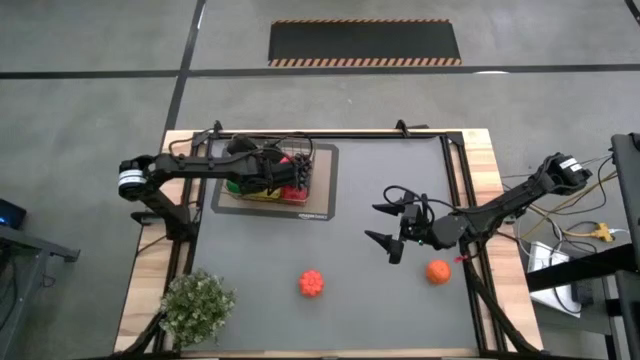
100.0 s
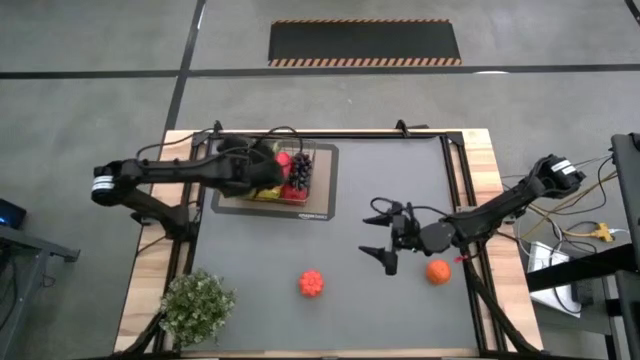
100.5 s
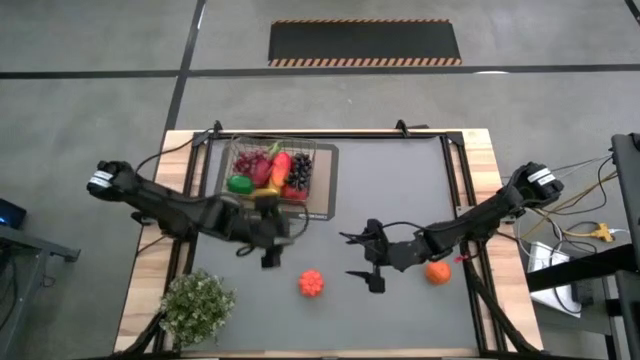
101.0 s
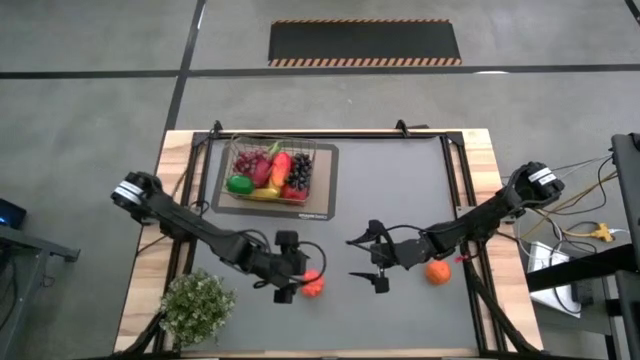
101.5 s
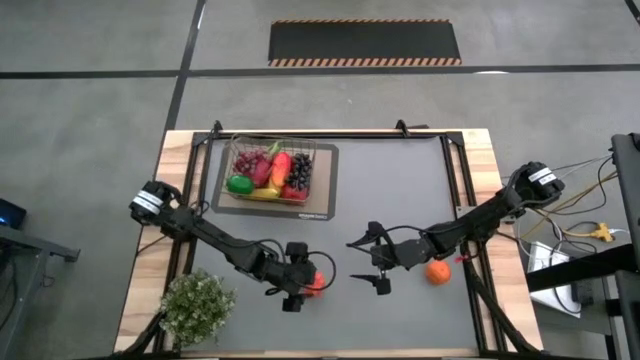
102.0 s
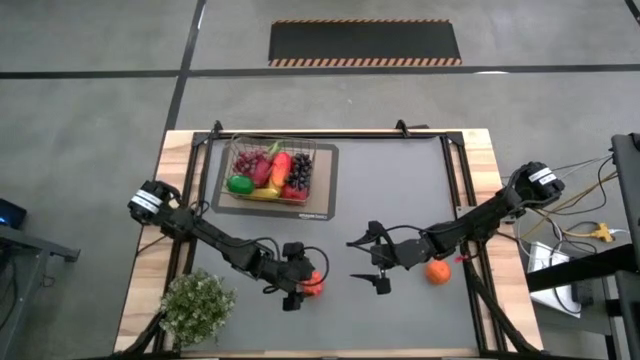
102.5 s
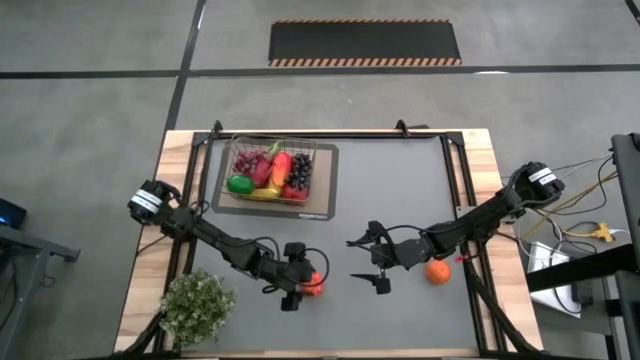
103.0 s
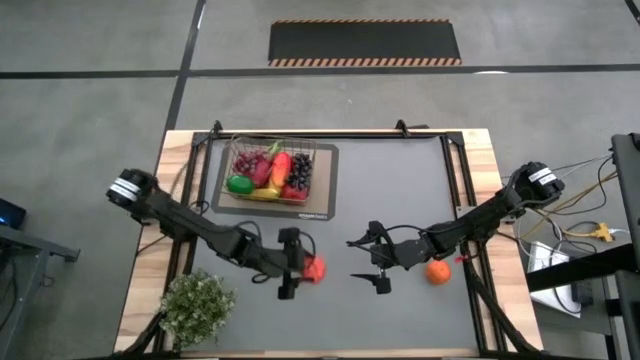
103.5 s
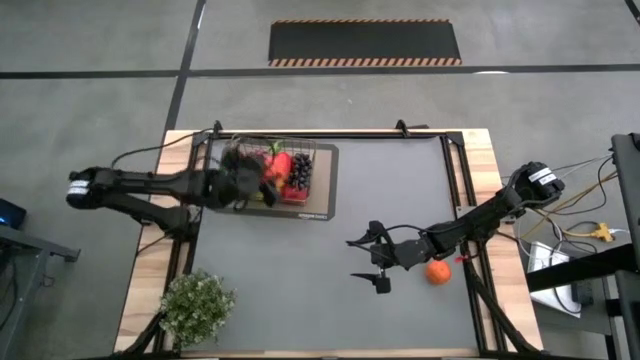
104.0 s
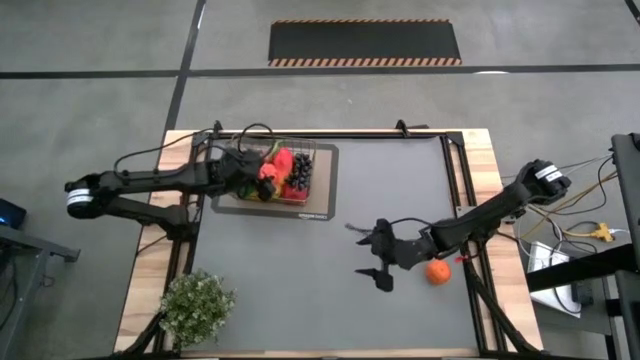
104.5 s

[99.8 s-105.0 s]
Task: Build produce basket
Put the orange pumpkin into the wire basket

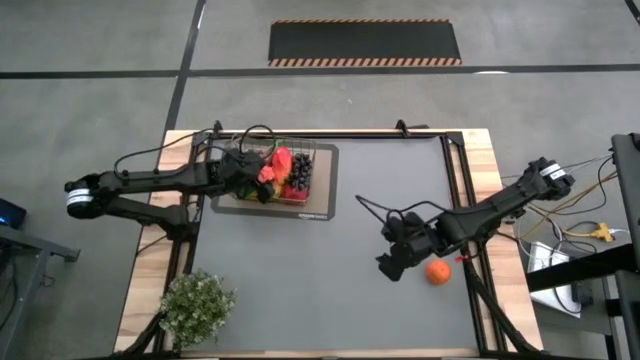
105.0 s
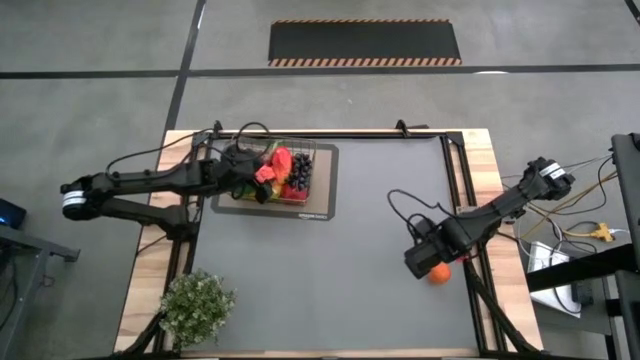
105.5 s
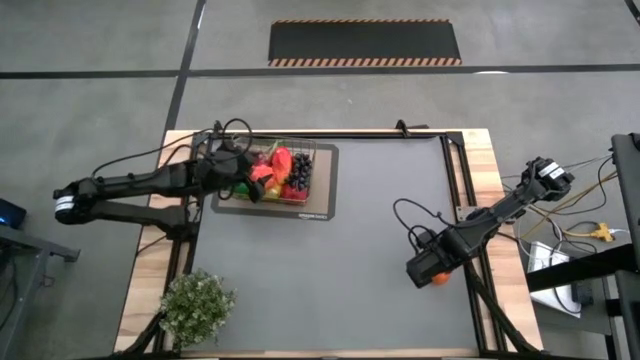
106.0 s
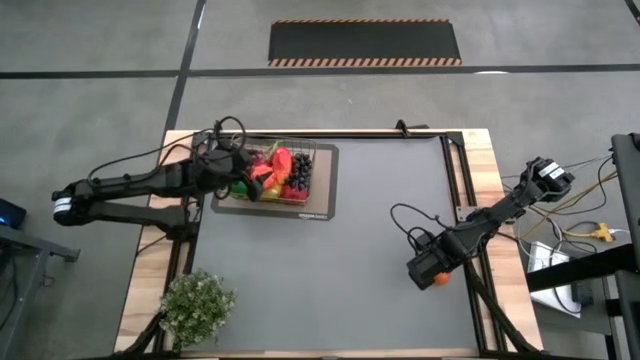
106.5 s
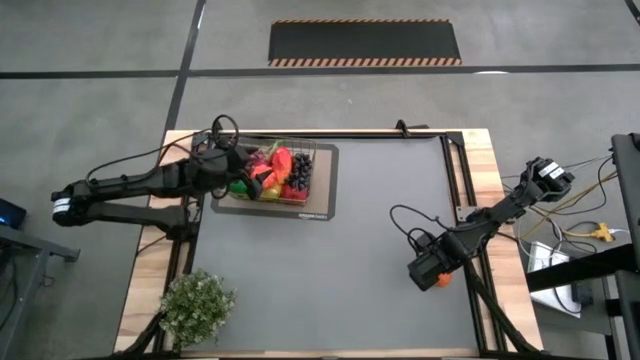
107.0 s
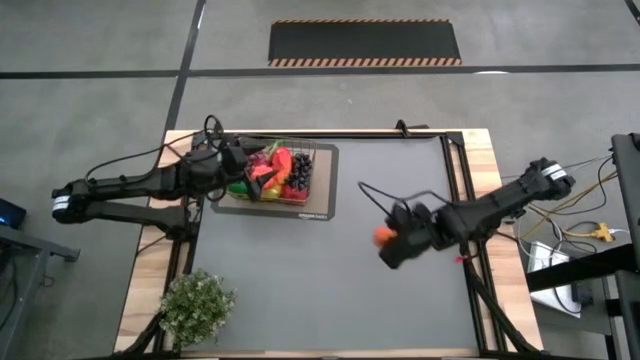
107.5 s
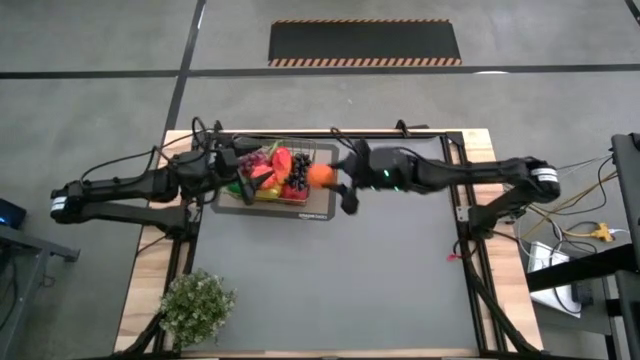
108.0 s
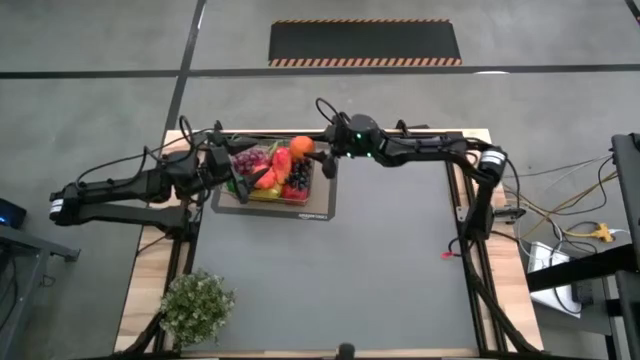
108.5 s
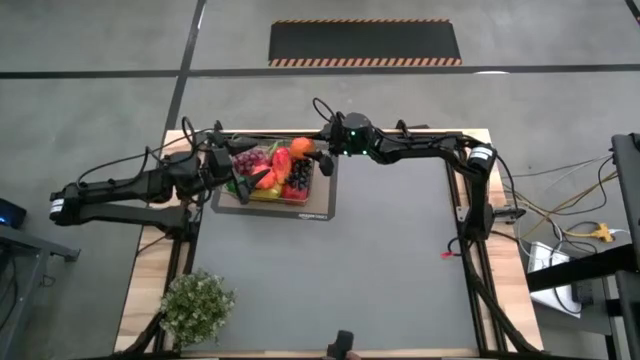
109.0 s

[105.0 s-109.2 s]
Put the orange into the wire basket

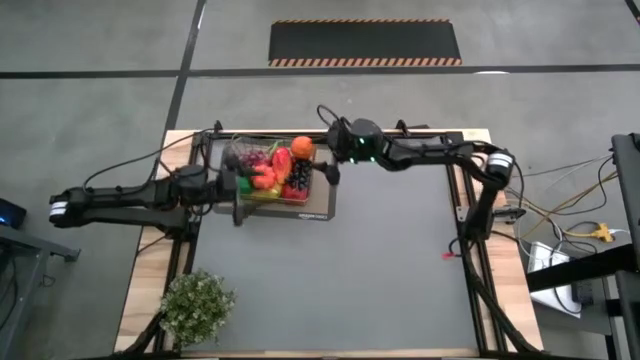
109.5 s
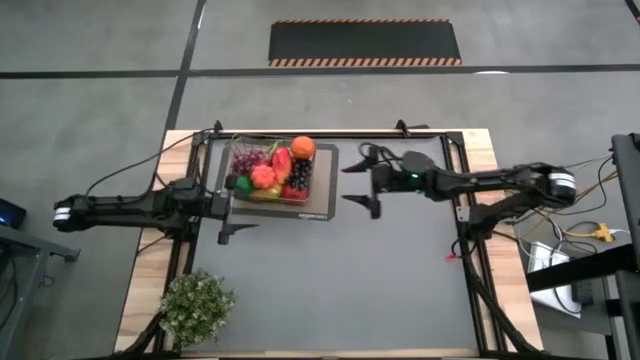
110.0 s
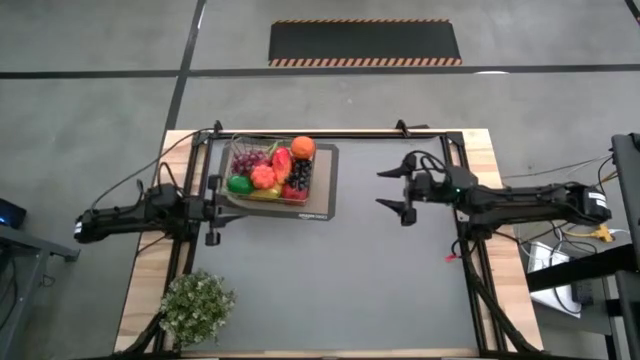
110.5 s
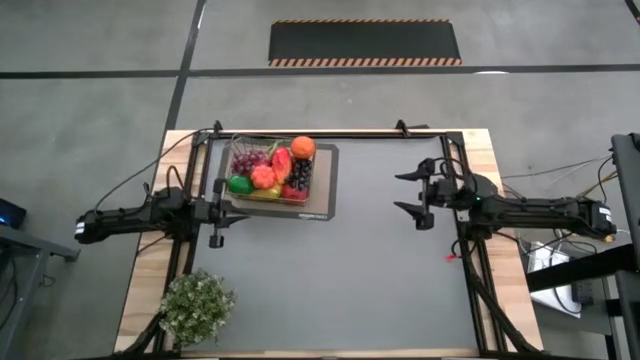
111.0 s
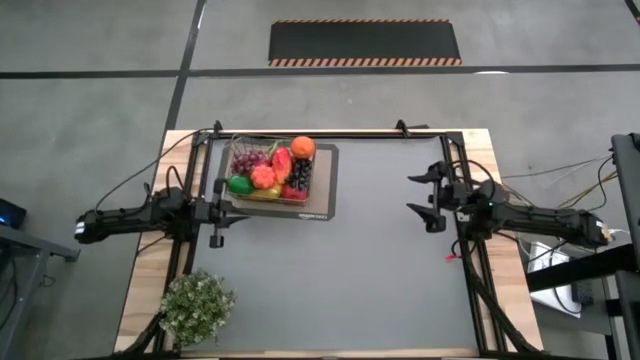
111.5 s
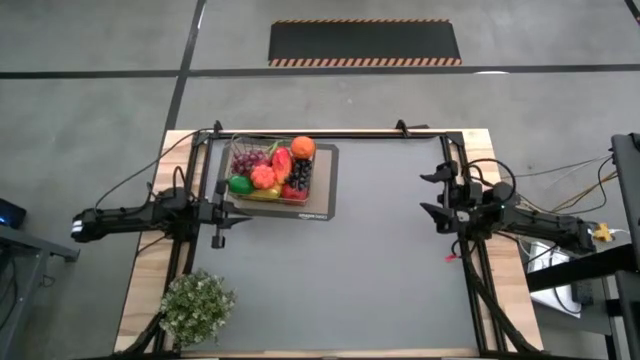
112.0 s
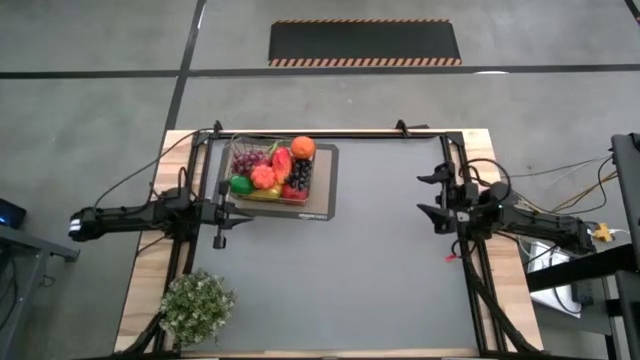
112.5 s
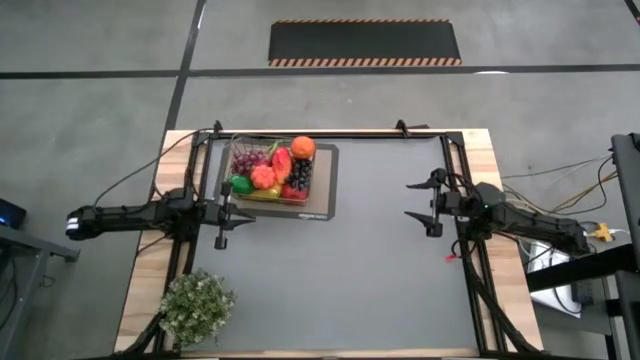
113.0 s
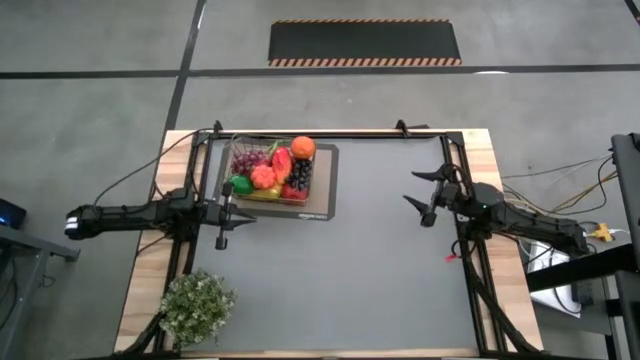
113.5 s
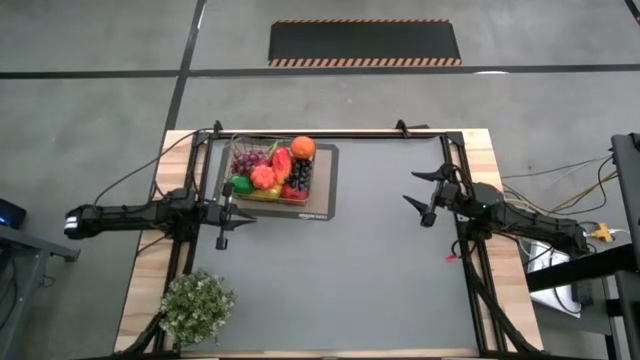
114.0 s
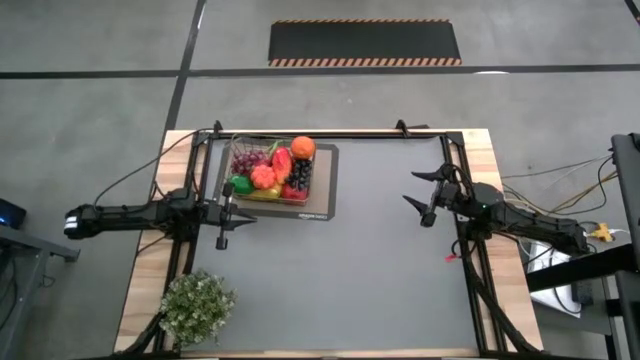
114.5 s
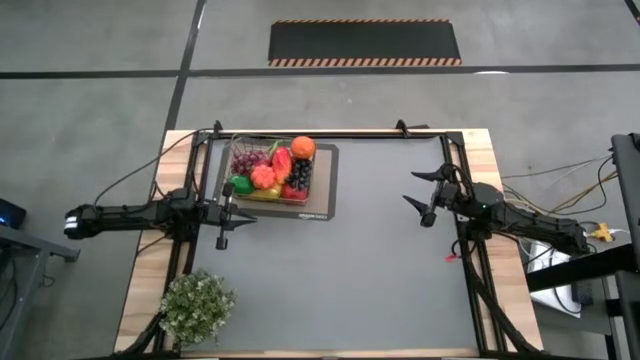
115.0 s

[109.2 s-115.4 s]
Return to Home Position

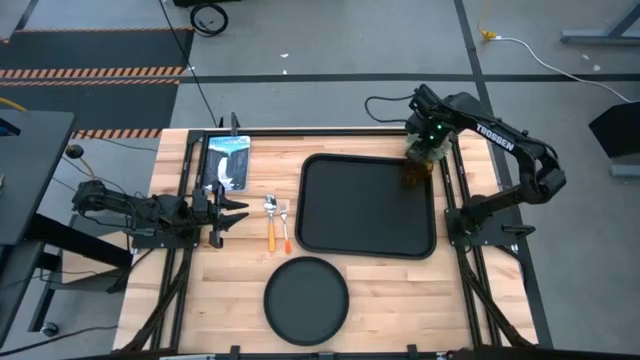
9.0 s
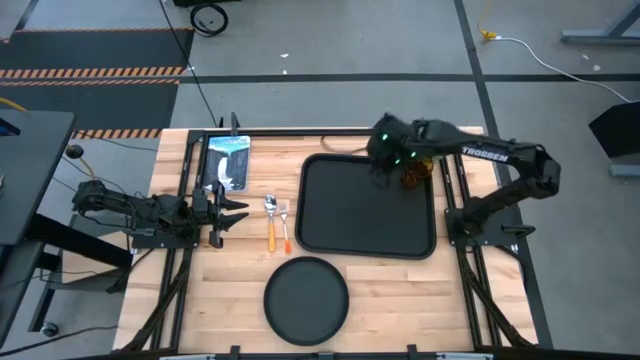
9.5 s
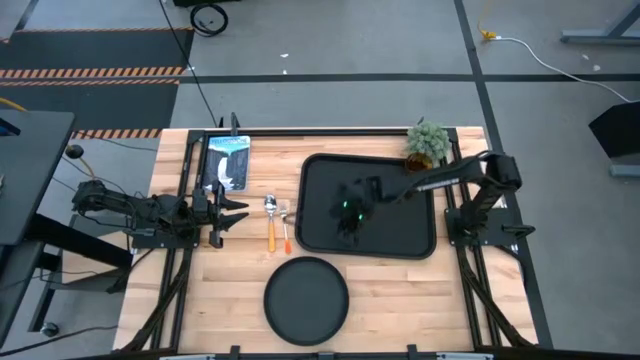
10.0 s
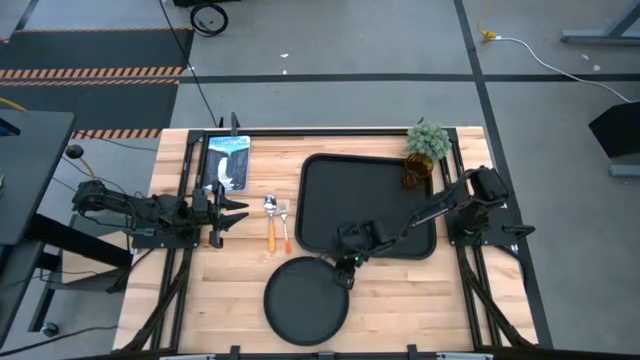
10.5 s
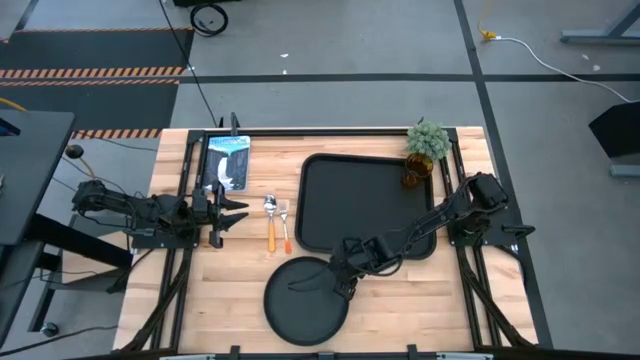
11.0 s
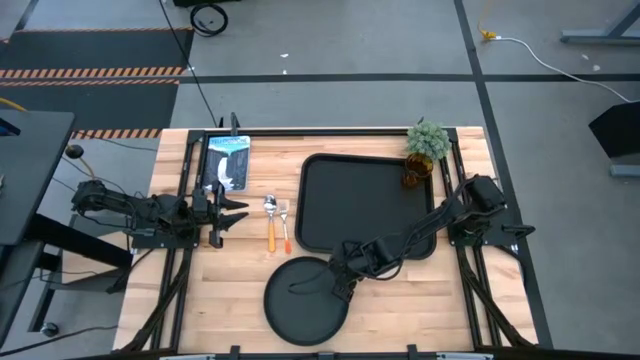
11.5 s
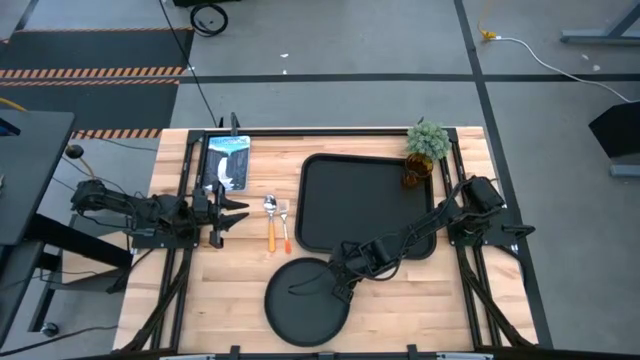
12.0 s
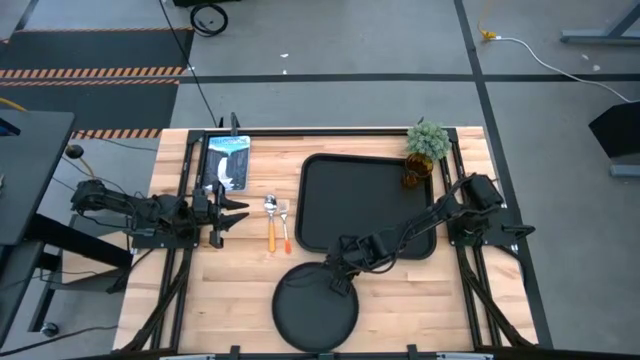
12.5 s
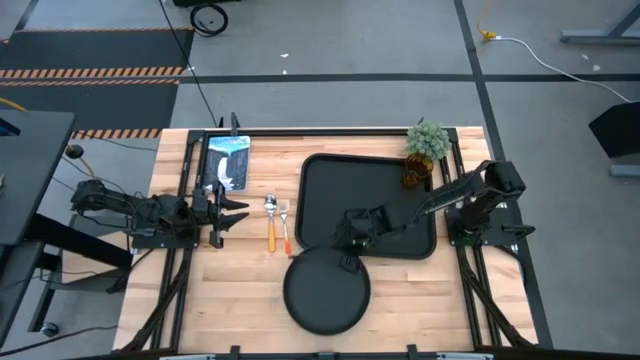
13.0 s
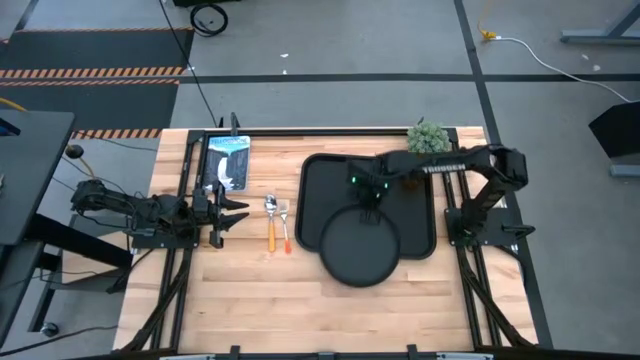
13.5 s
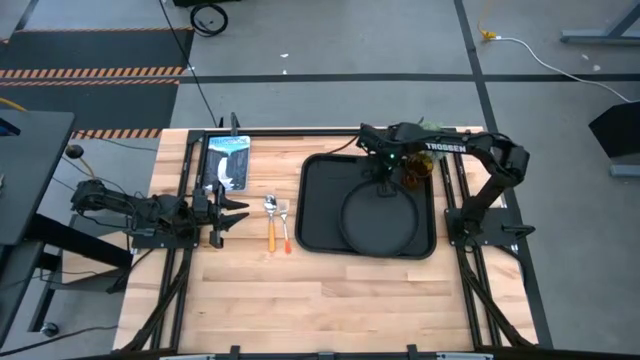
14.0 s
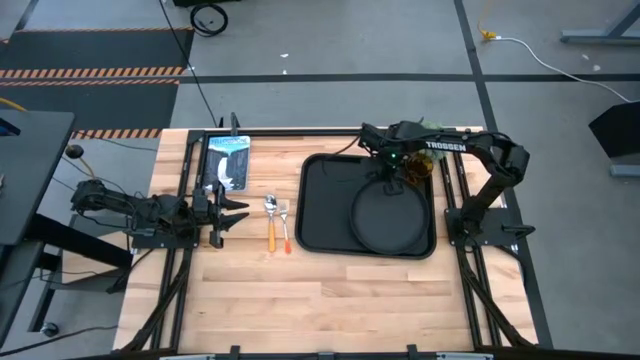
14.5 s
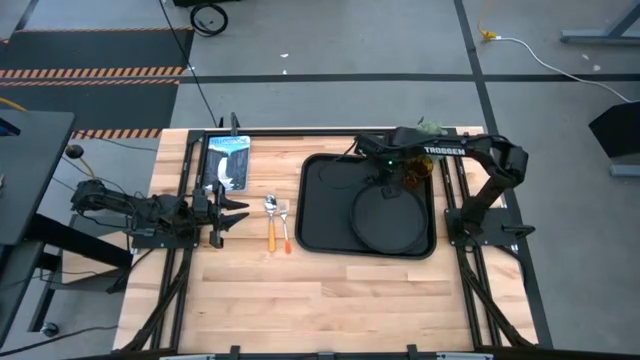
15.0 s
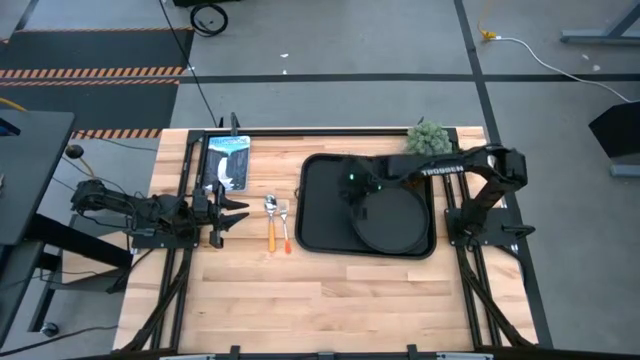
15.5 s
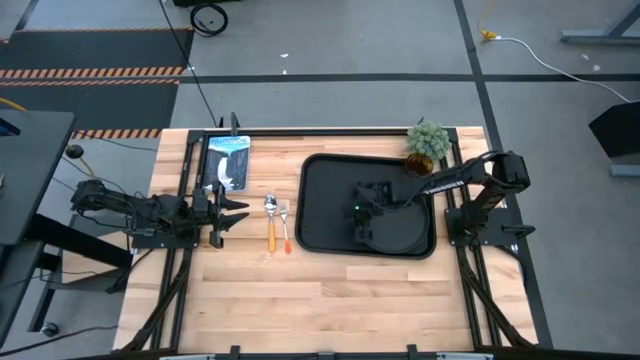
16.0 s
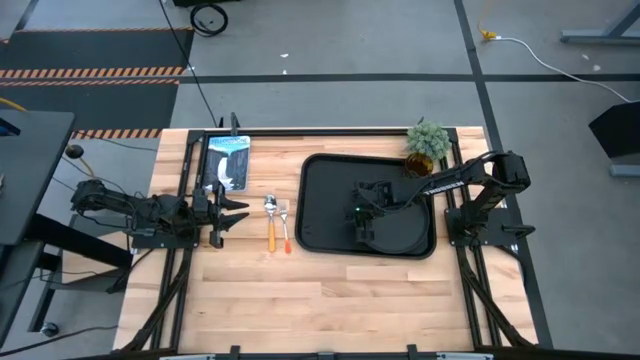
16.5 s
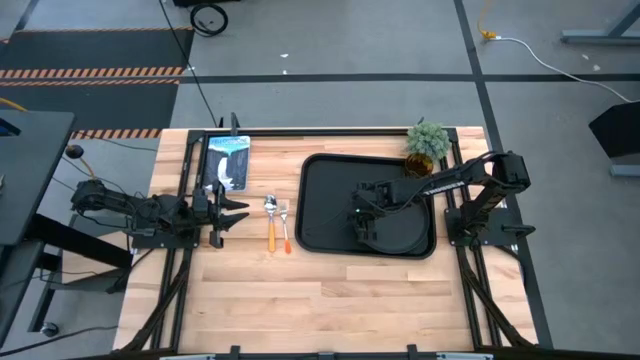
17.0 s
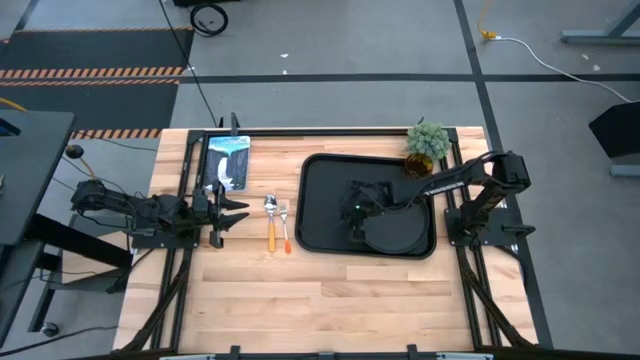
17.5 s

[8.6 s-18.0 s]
Task: Pick and place plate/cup/fork/spoon on tray
Put the black plate on the black tray
